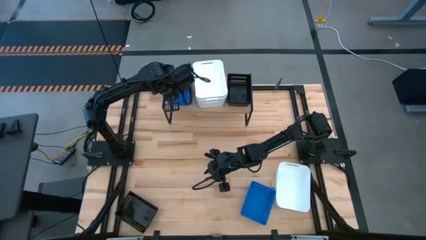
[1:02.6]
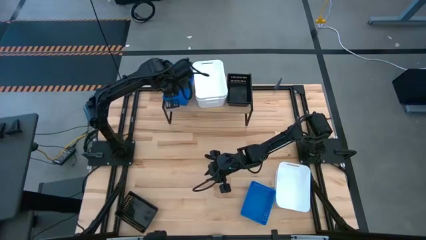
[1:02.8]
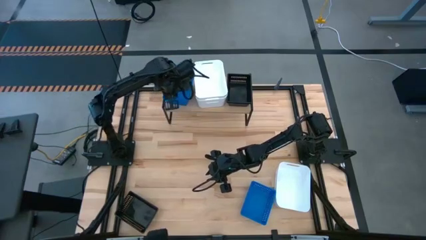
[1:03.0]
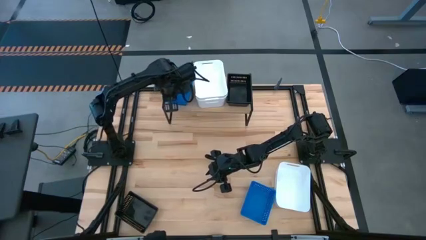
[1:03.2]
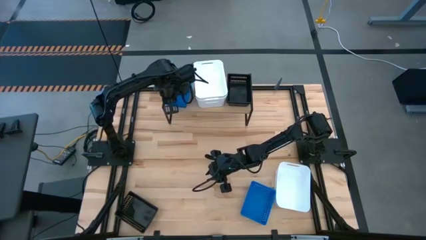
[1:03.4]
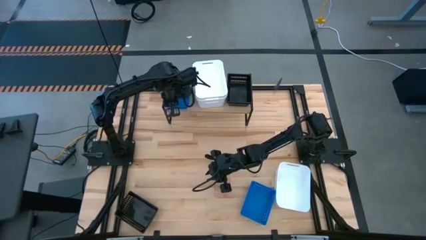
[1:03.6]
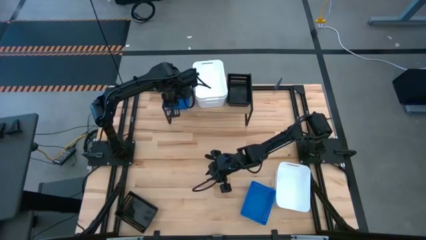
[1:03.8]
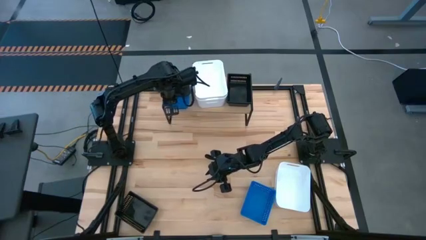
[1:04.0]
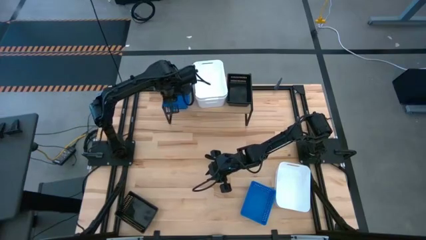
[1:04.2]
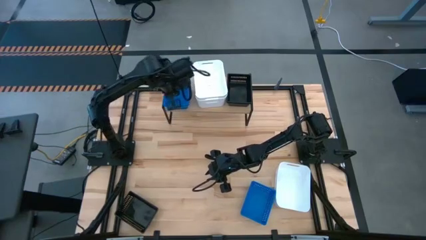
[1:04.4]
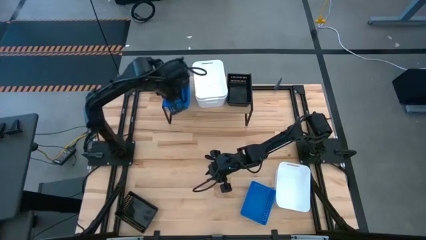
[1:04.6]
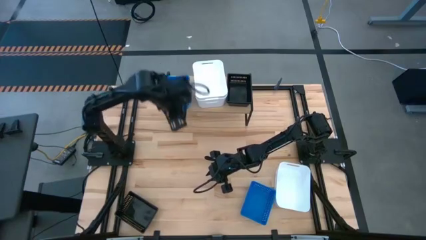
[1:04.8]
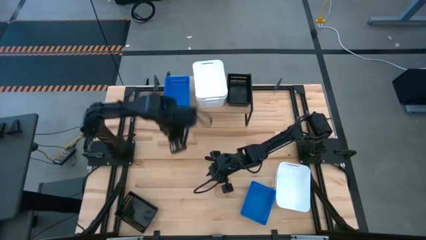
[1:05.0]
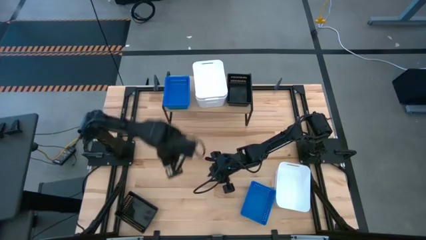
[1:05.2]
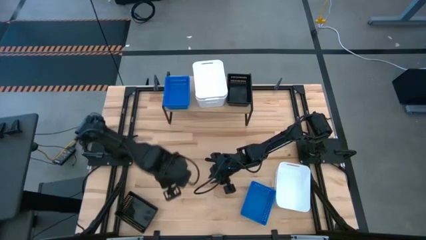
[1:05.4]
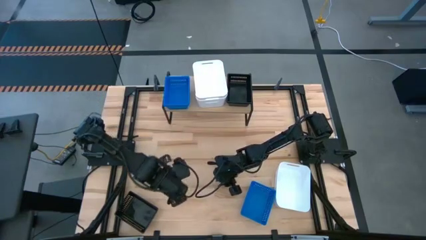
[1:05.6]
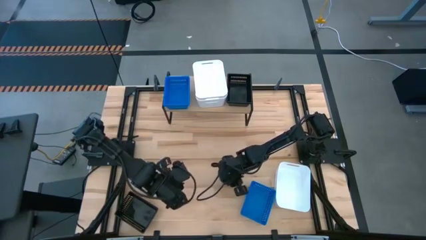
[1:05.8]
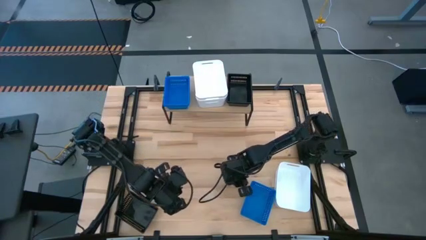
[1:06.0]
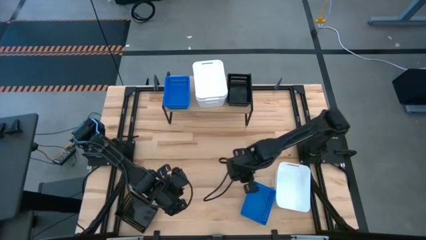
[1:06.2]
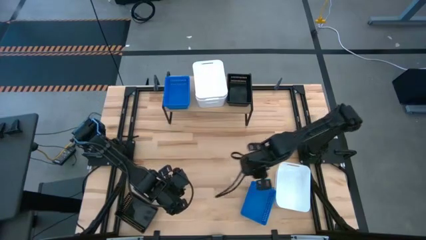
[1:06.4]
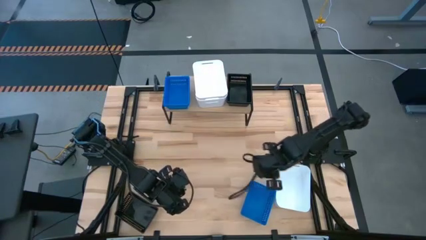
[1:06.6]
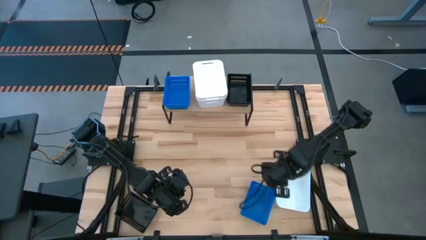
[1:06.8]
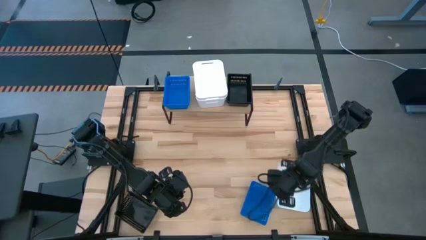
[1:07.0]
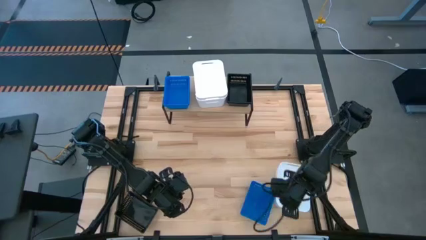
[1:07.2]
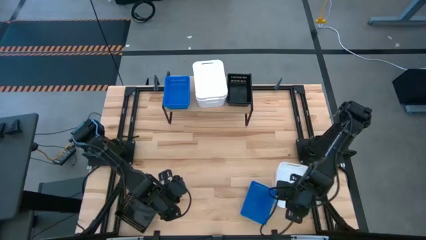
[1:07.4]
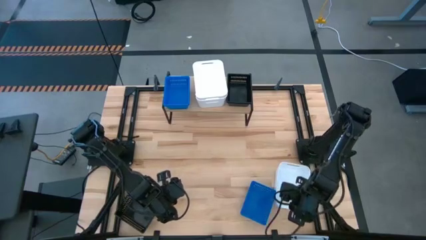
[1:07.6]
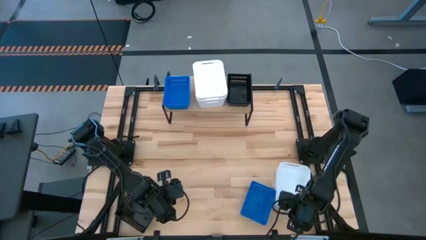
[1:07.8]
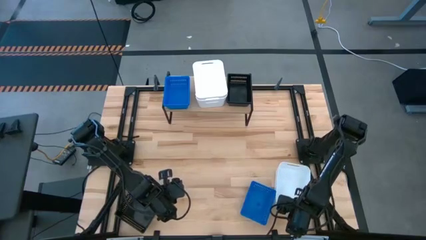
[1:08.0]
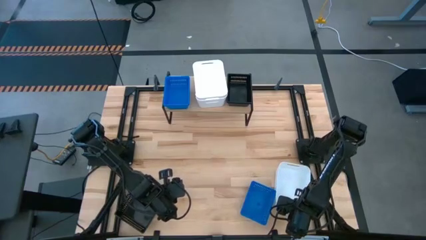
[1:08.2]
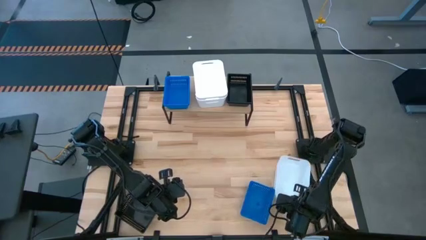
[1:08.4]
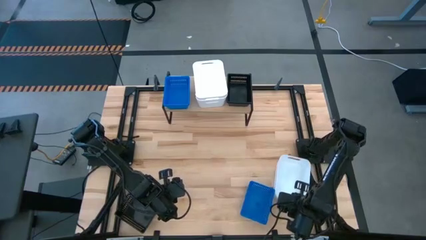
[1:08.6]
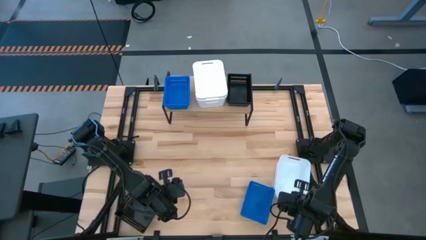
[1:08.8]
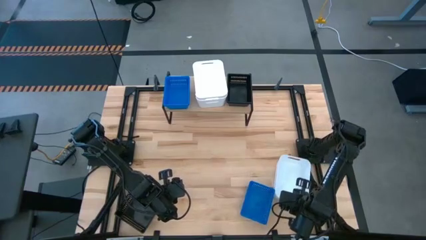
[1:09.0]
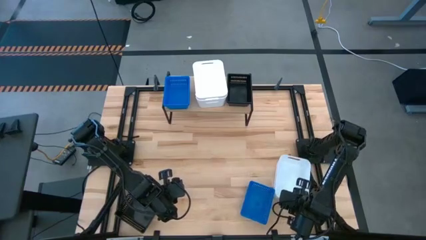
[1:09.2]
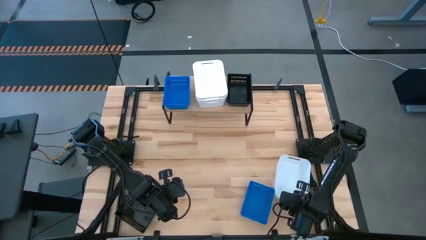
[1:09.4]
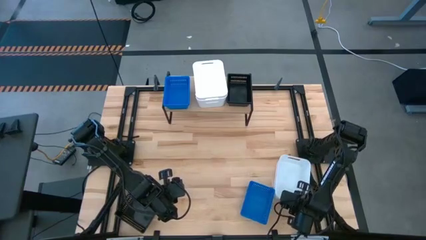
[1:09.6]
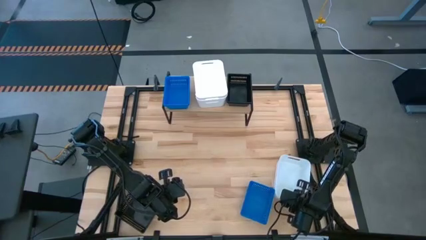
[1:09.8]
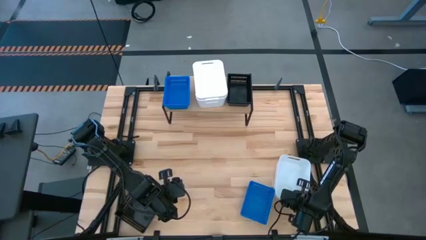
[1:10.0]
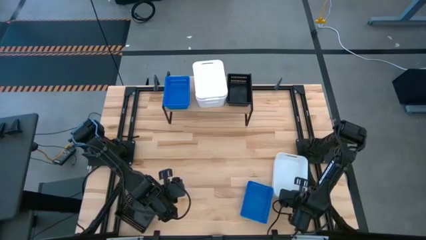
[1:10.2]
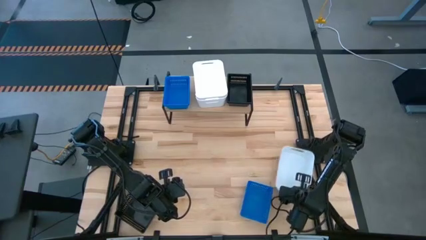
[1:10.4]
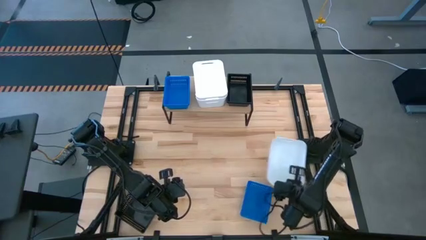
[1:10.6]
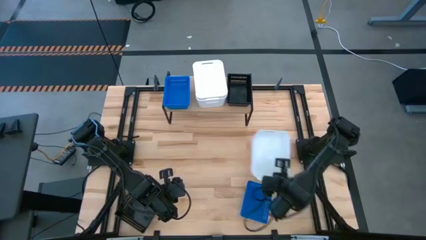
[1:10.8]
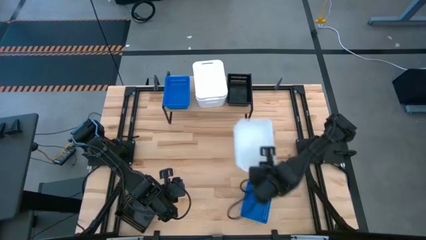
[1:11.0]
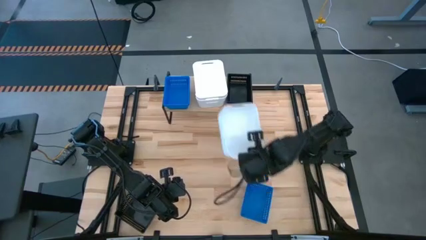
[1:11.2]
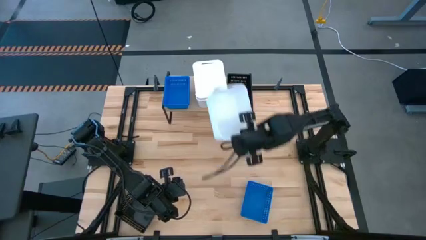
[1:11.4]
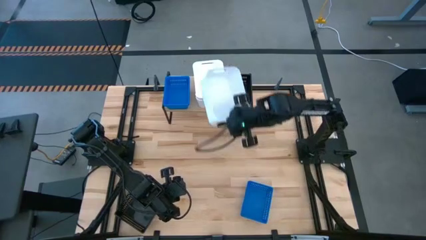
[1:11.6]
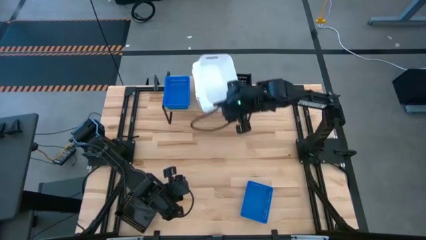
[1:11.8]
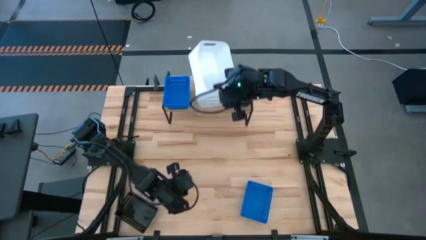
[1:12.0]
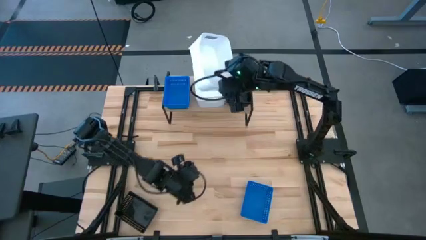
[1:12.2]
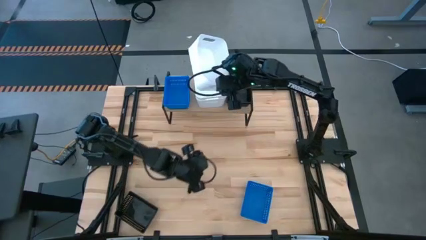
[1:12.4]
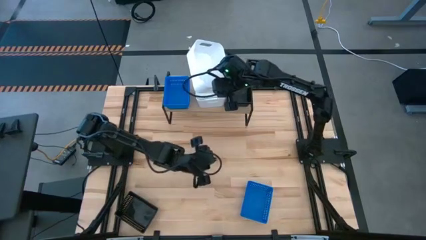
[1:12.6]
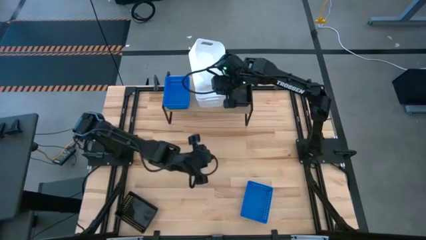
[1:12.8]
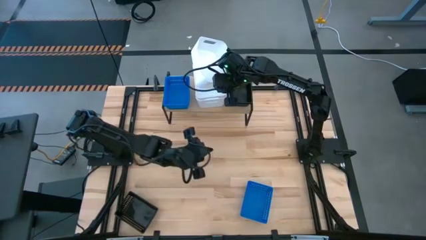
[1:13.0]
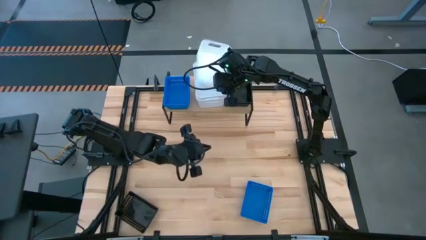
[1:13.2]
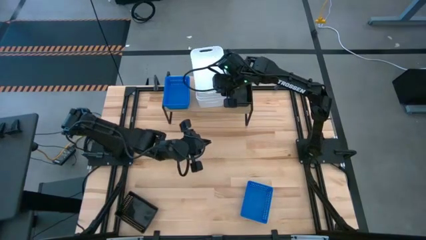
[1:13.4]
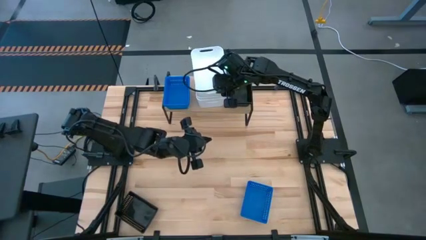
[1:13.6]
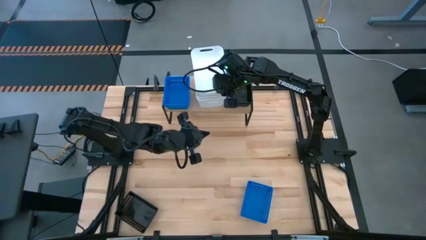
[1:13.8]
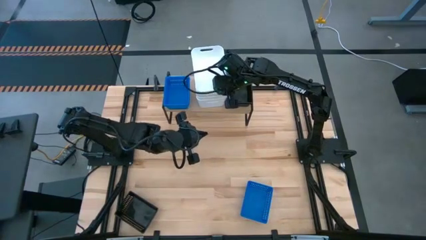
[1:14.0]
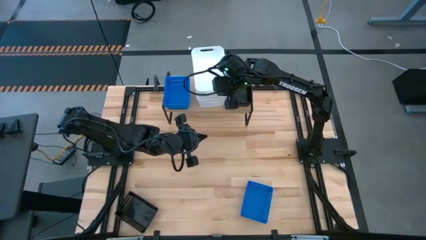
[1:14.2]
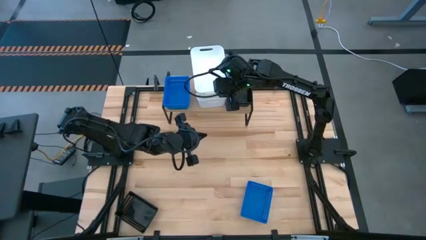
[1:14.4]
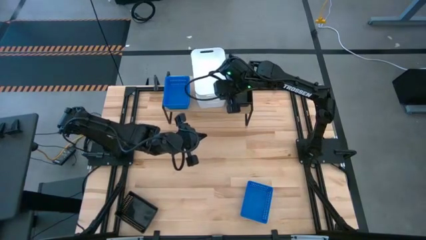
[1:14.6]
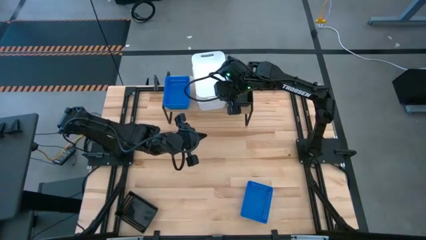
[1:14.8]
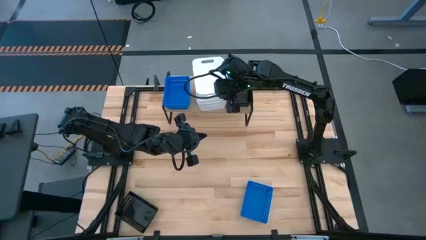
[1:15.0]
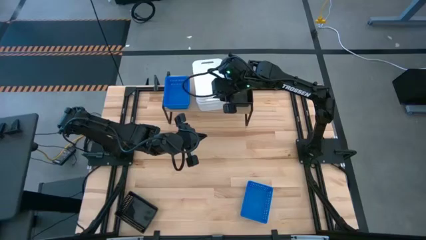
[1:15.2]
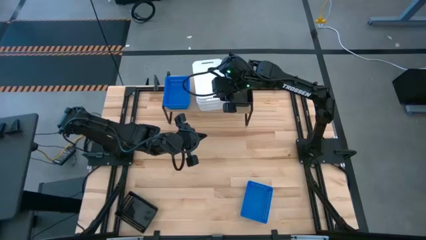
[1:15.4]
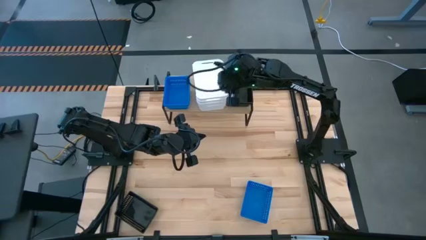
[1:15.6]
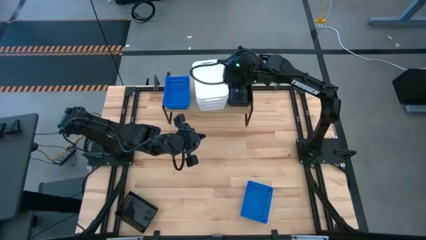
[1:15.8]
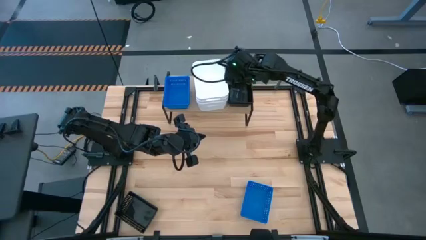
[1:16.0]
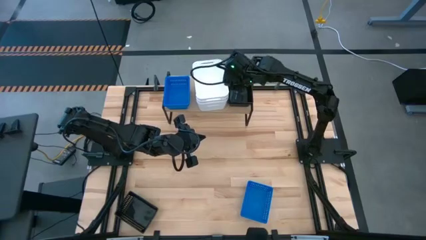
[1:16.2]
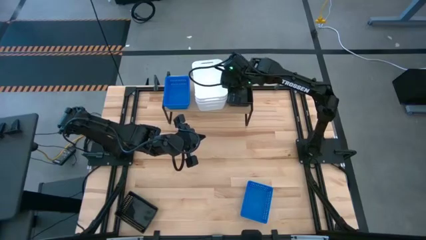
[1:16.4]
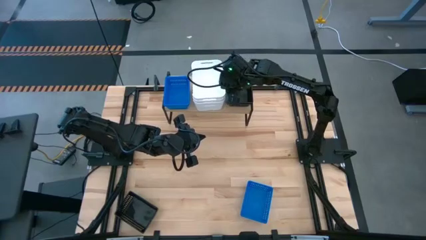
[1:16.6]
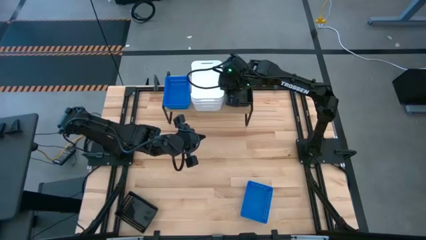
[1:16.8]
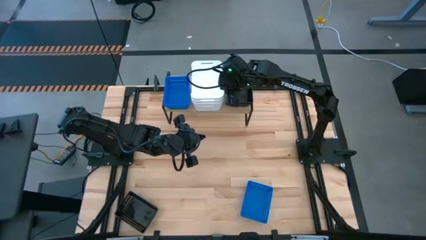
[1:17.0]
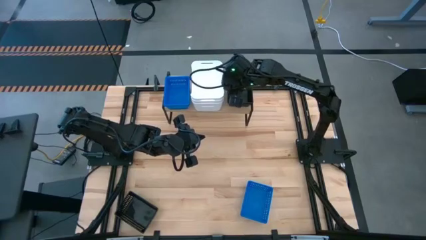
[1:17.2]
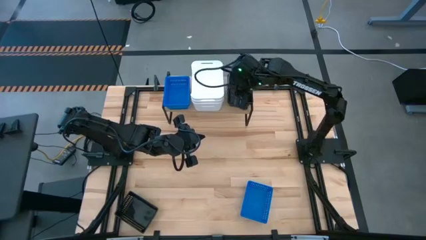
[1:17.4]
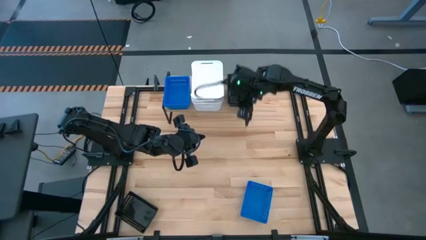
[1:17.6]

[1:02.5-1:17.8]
Task: Stack baskets on shelf by color
Stack the white bin into the white bin on the shelf
